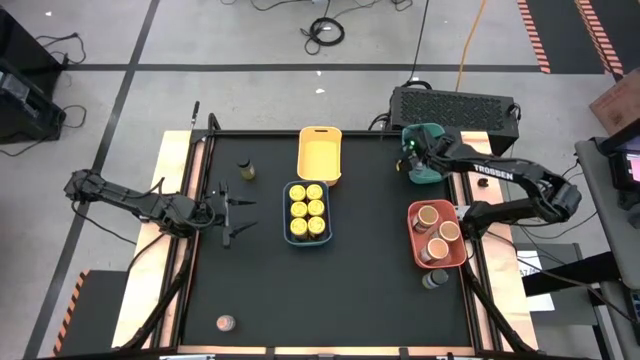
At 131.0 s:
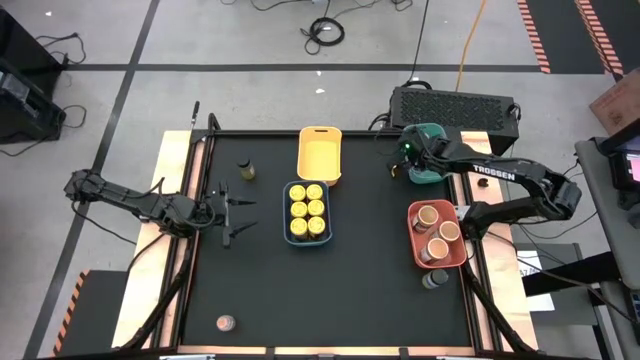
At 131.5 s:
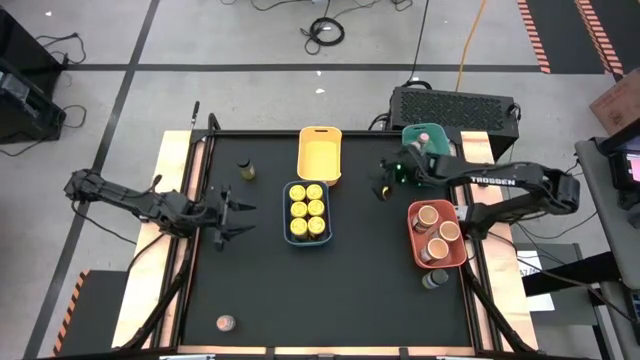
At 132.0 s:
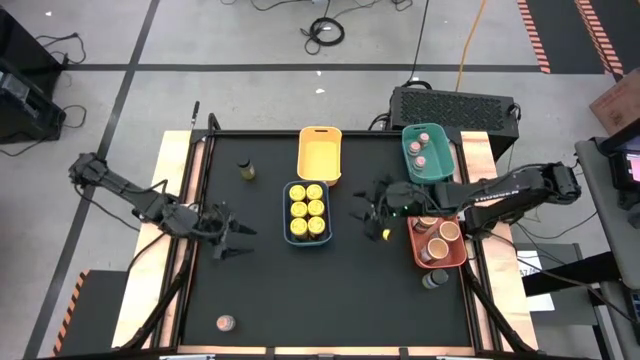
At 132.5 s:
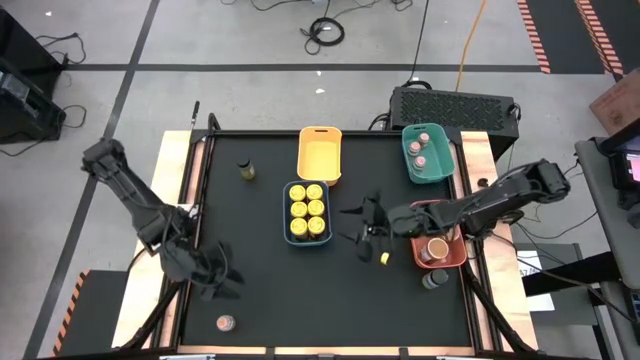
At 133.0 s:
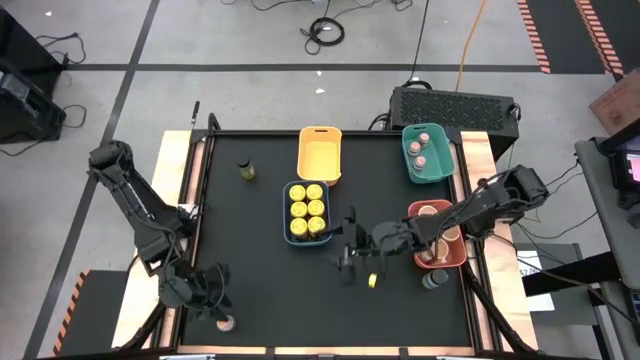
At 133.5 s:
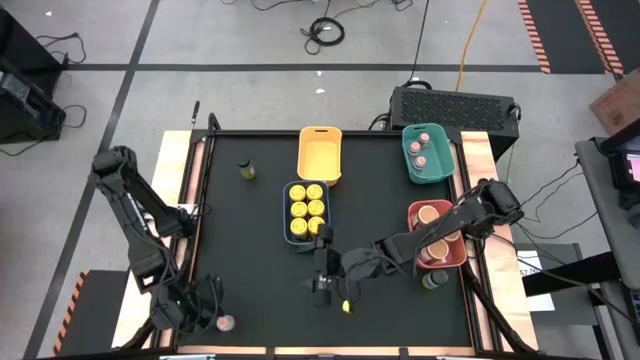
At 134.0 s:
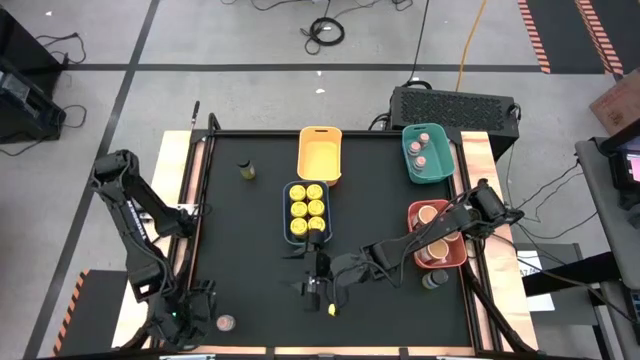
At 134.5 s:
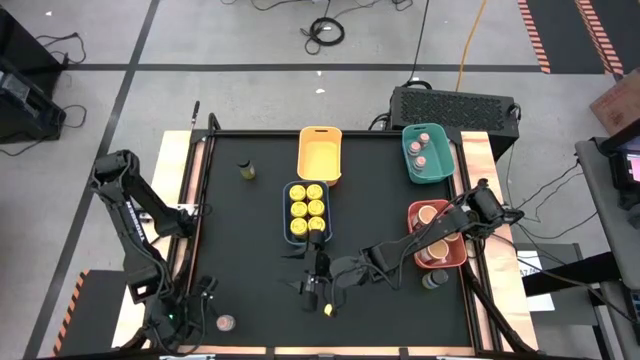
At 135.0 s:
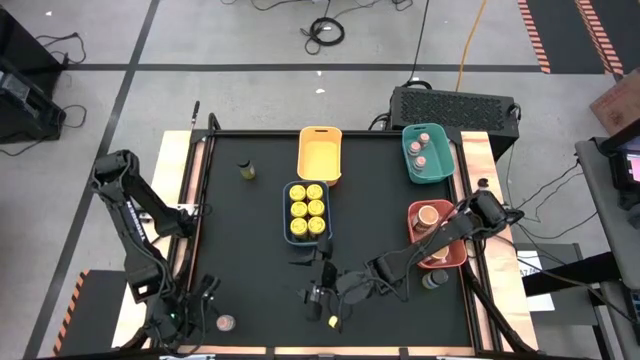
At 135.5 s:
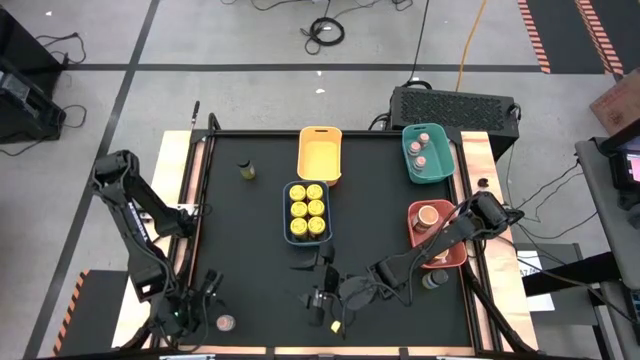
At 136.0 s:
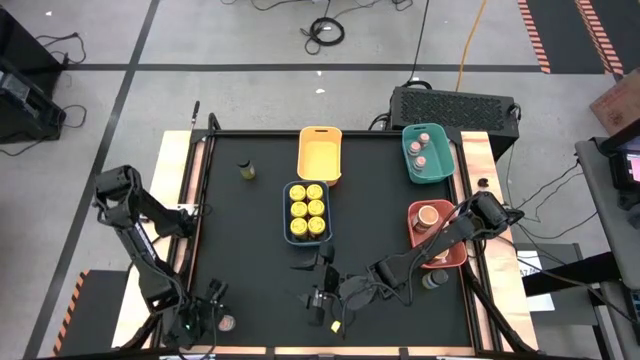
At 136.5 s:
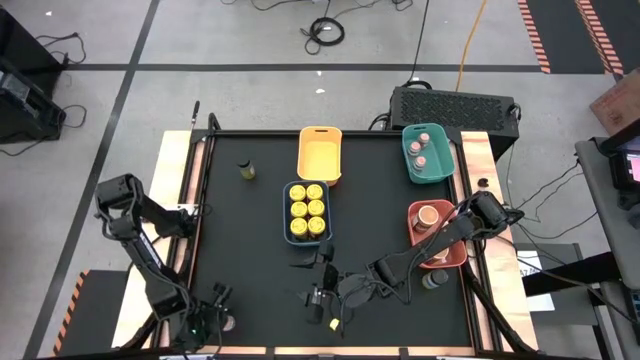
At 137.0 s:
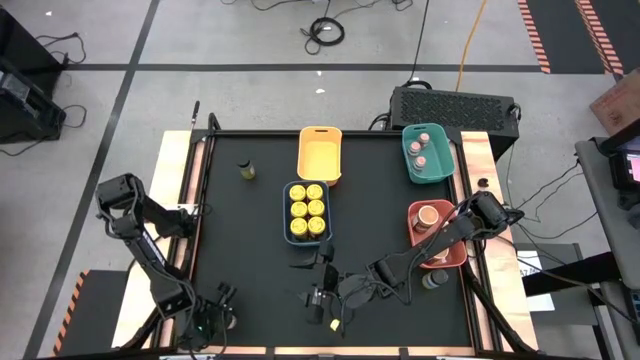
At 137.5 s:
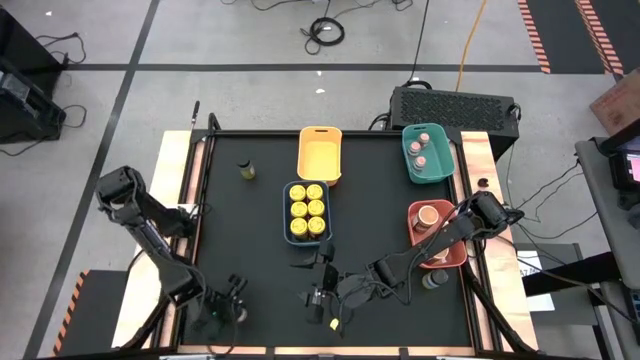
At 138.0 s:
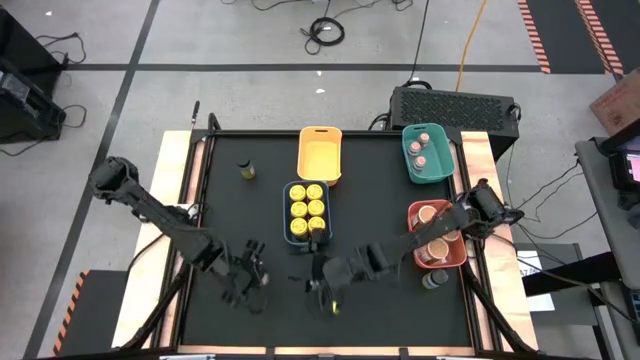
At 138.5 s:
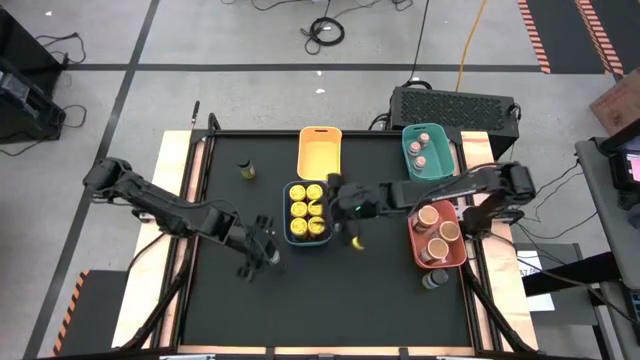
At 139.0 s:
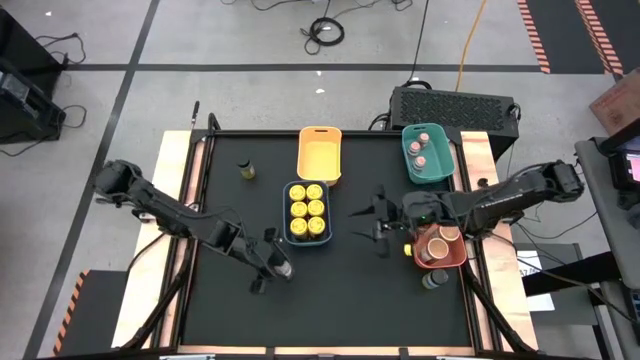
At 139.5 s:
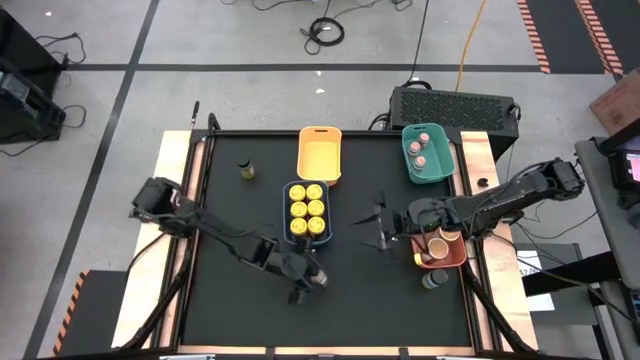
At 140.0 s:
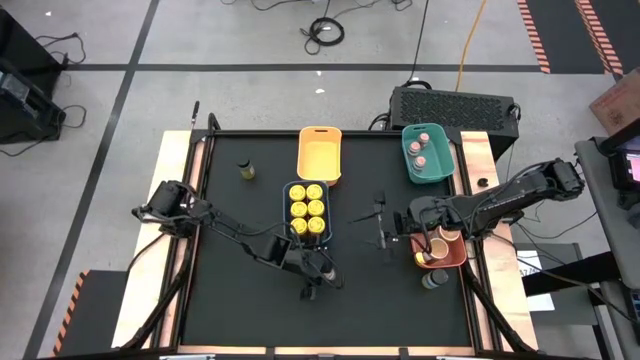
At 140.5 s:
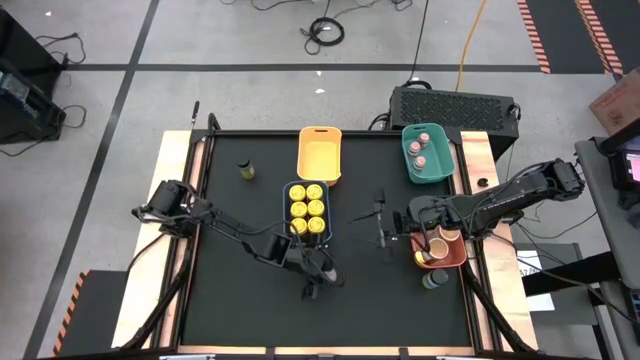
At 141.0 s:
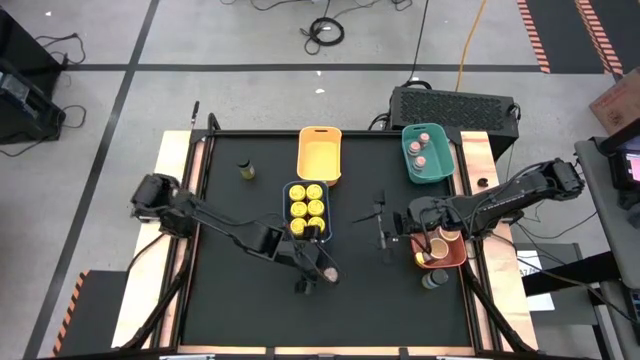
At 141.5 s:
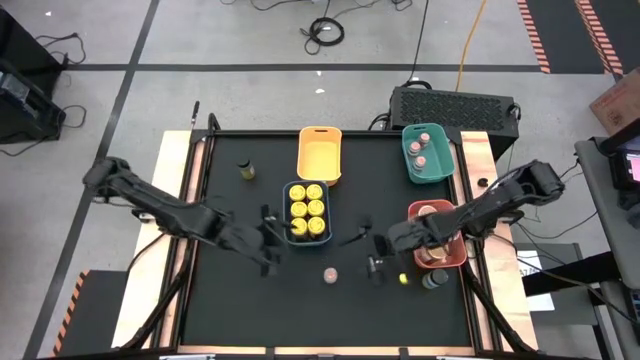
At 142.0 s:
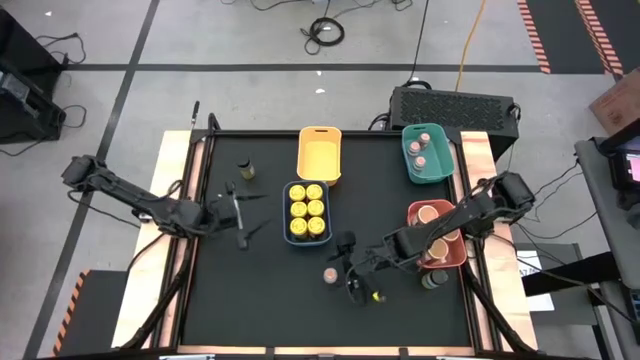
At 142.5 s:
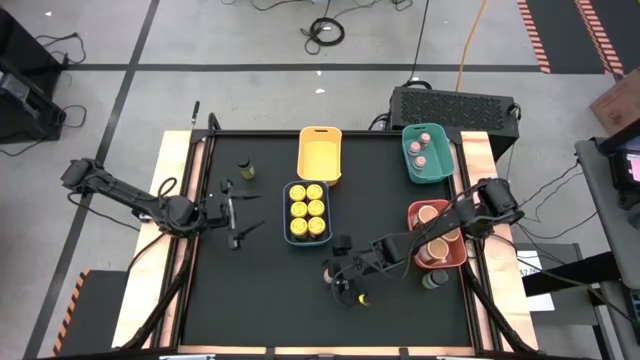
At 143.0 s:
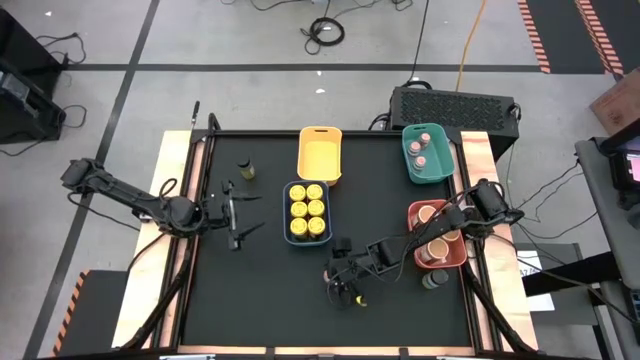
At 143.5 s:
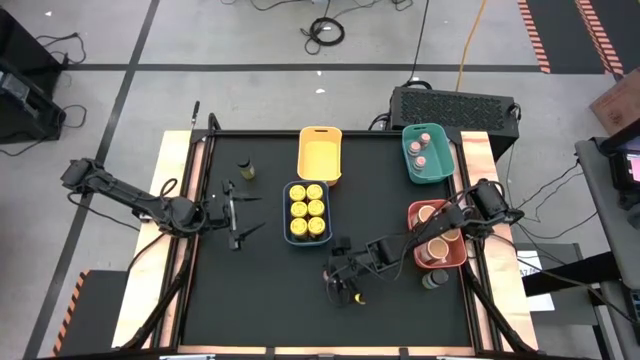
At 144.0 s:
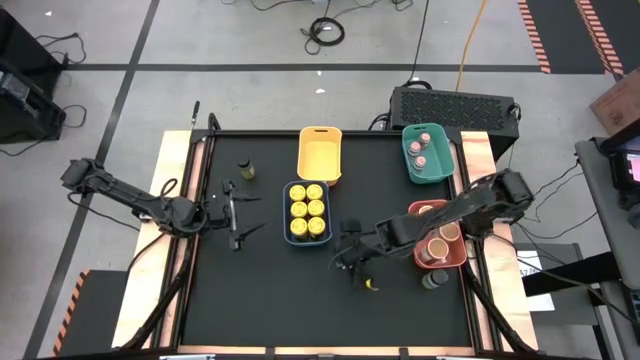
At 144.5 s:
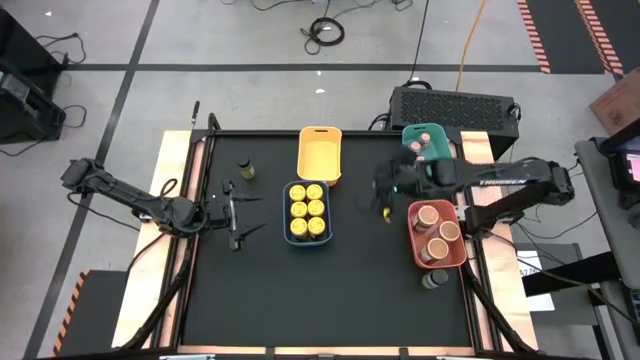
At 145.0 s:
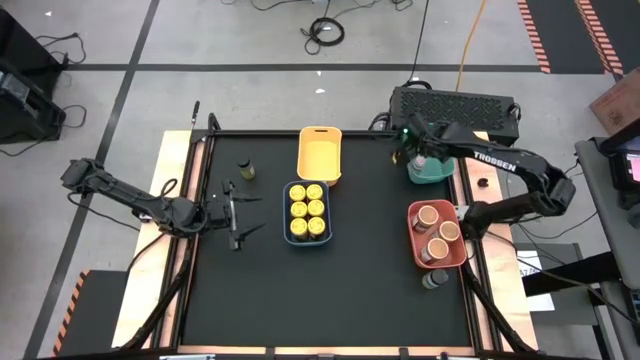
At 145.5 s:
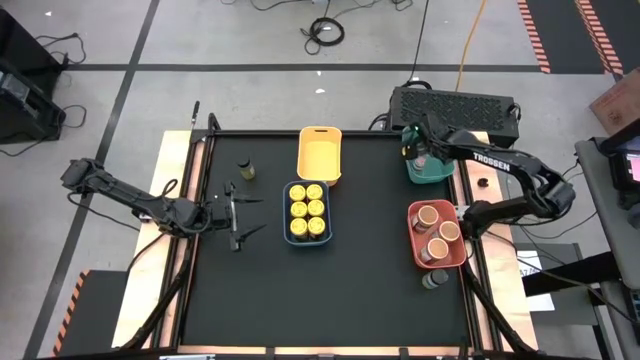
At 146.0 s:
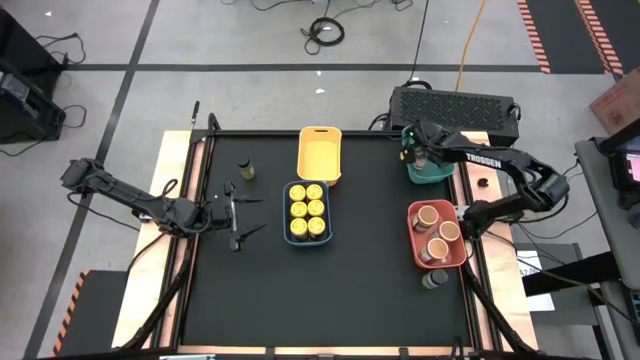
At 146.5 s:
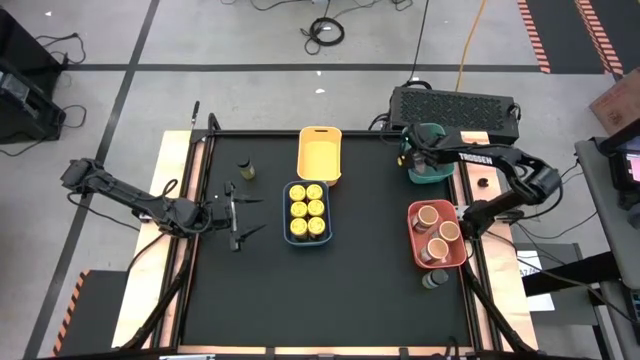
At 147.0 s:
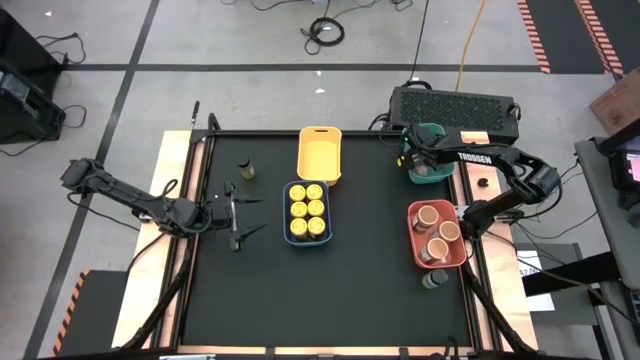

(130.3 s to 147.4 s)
Task: Sort spices by type
Put the brown seasoning bottle into the green bin

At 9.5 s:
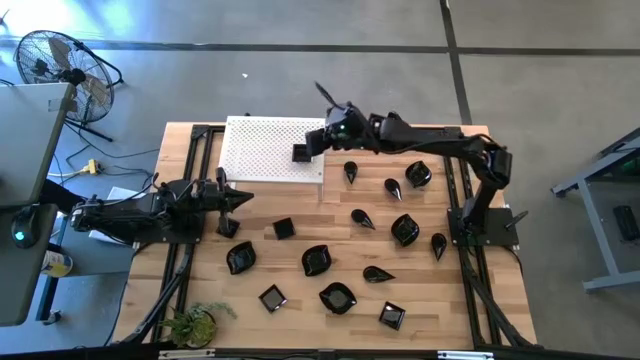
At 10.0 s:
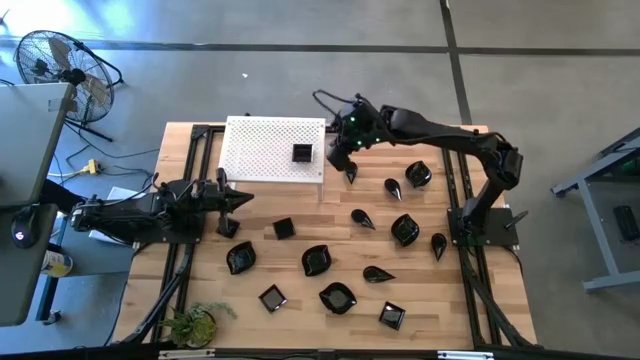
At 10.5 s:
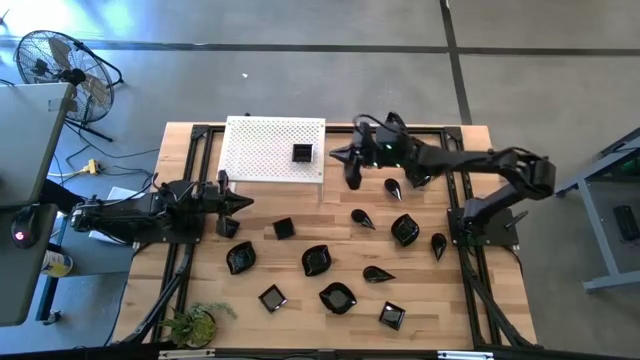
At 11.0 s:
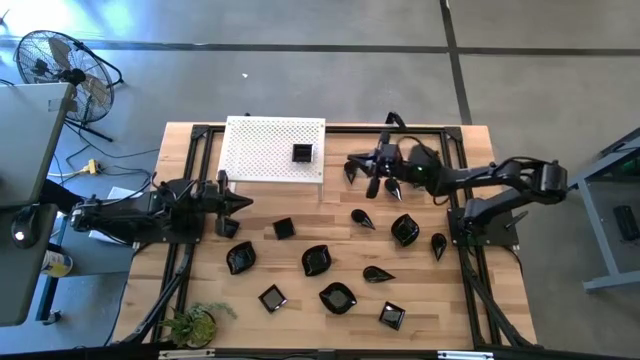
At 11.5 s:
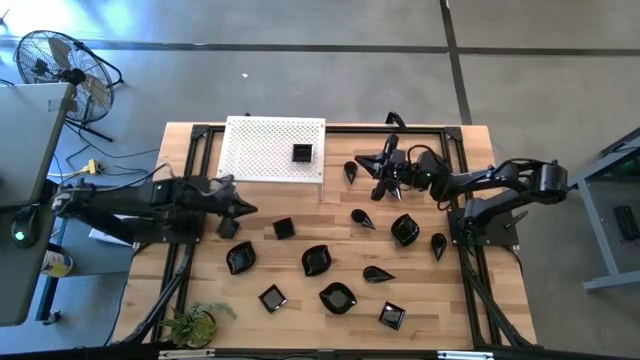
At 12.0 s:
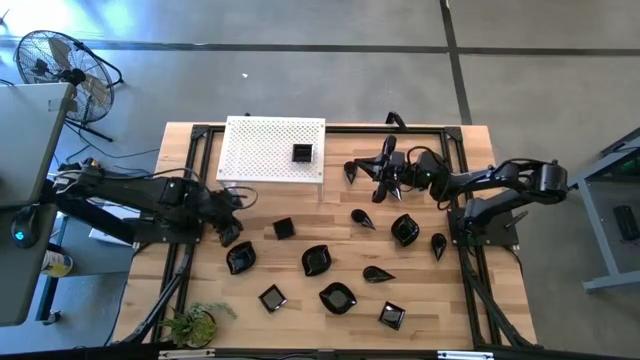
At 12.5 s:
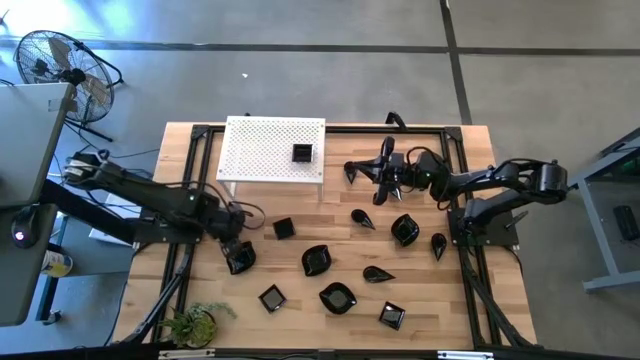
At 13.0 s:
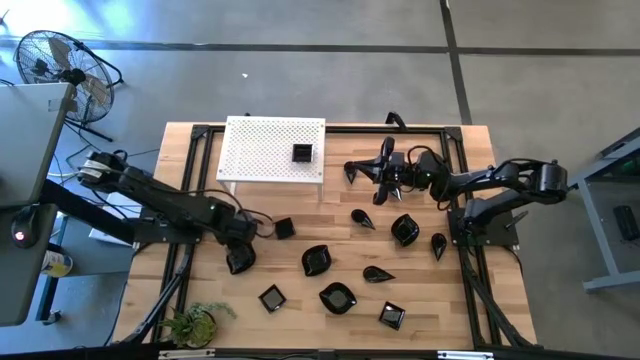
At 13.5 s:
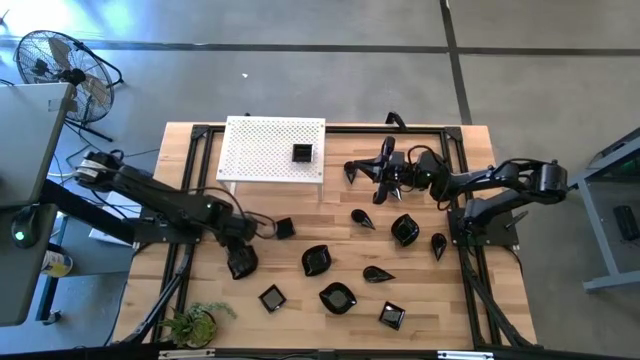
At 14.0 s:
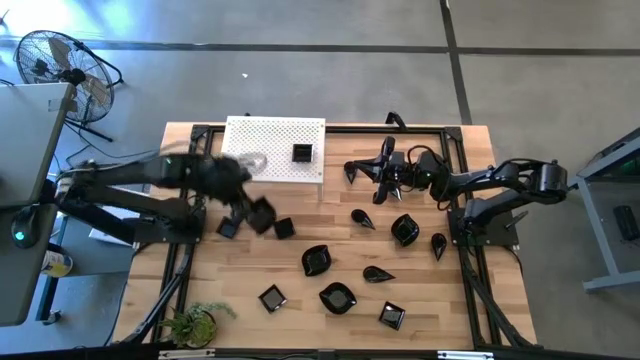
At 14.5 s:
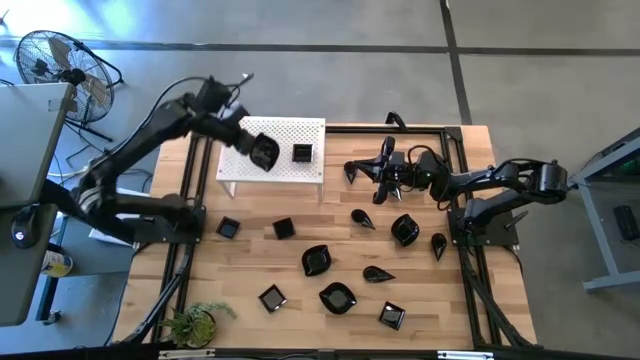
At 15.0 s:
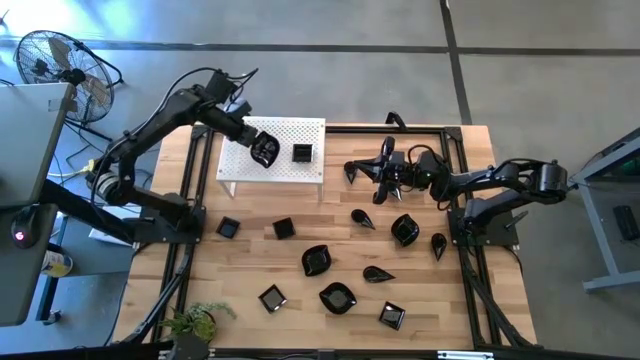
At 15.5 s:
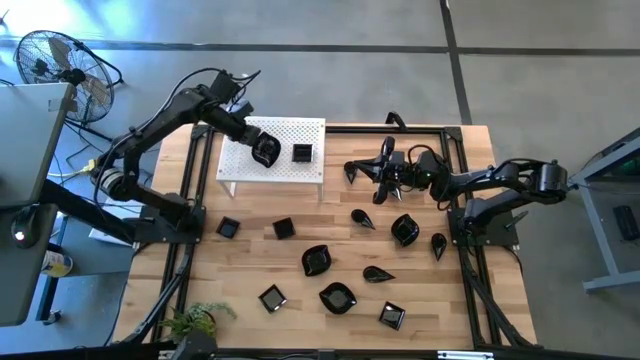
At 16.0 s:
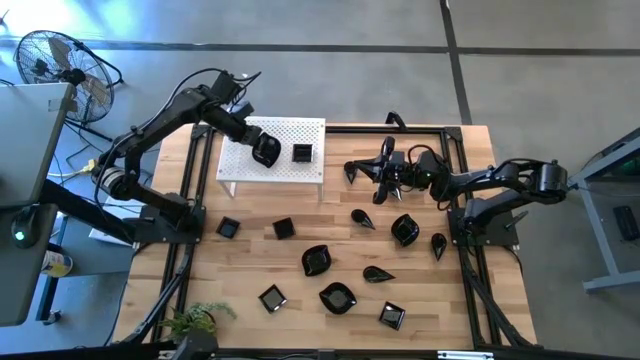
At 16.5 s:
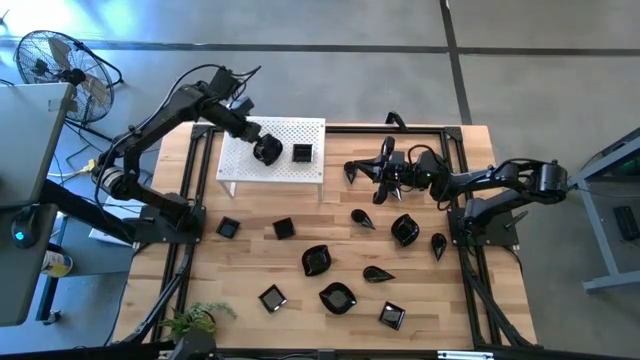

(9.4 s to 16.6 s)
Task: Pick & Place Mini shaped plates
Put the left leaf-shaped plate on the shelf
